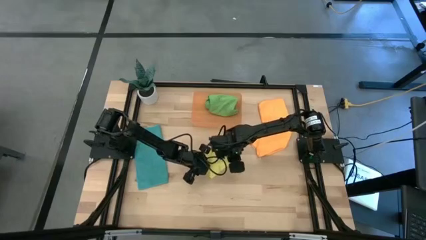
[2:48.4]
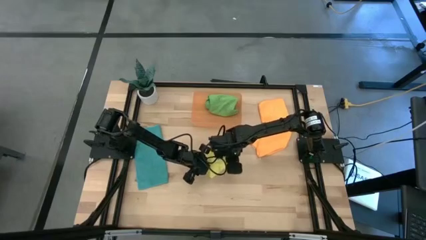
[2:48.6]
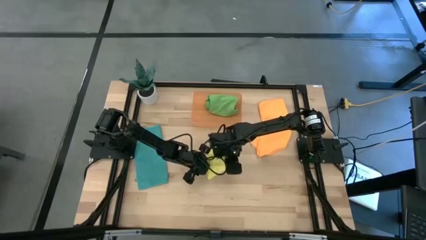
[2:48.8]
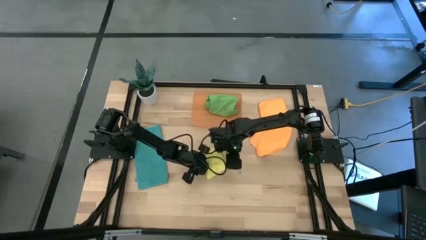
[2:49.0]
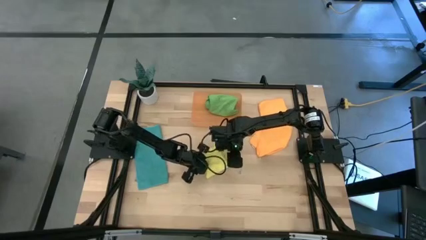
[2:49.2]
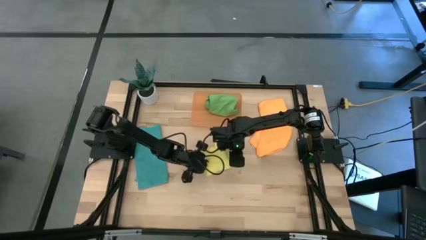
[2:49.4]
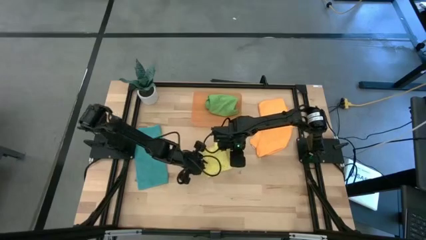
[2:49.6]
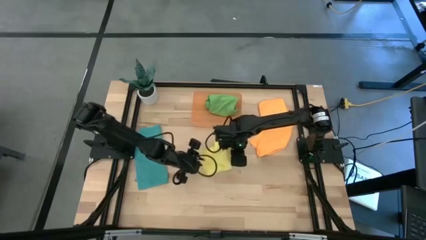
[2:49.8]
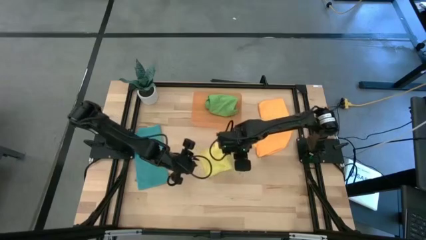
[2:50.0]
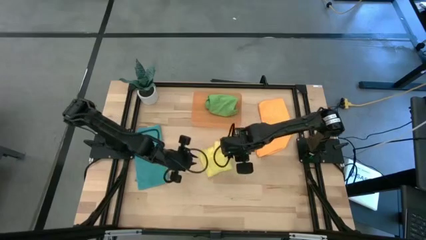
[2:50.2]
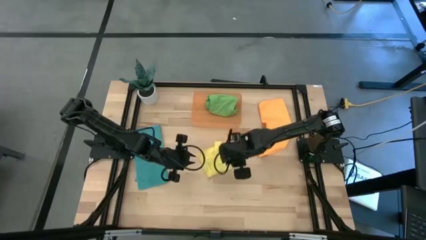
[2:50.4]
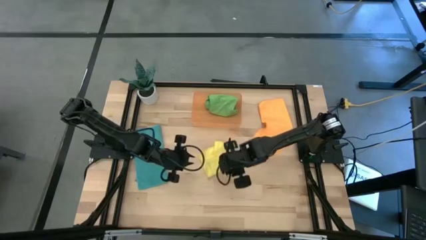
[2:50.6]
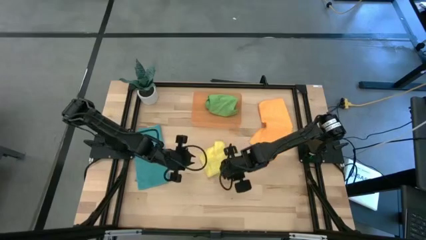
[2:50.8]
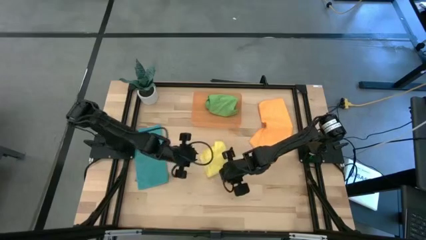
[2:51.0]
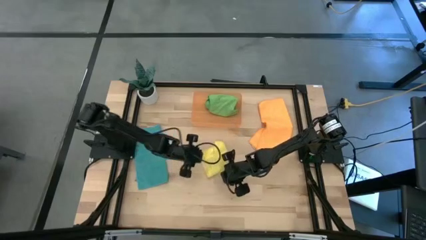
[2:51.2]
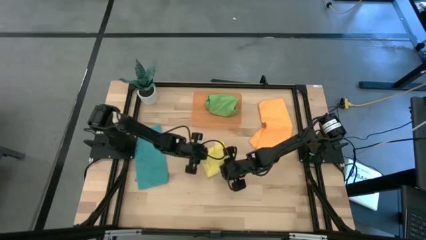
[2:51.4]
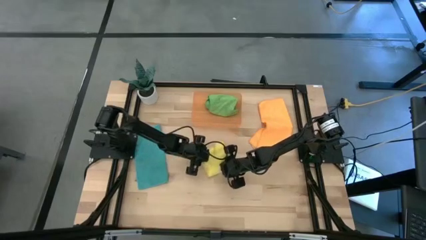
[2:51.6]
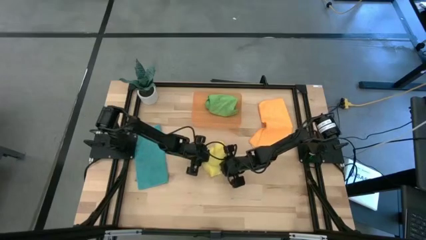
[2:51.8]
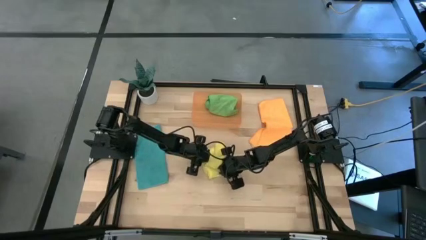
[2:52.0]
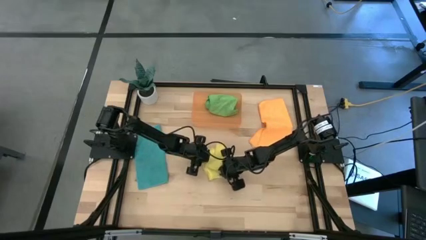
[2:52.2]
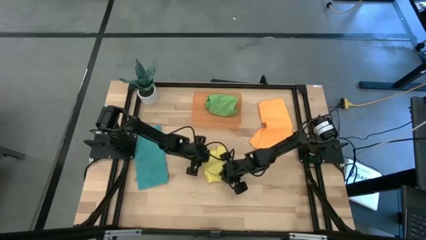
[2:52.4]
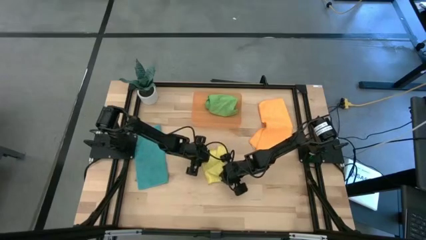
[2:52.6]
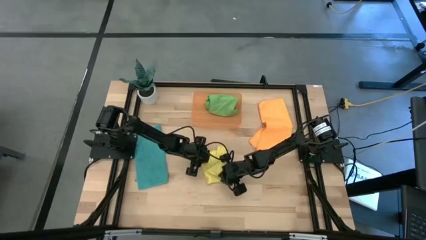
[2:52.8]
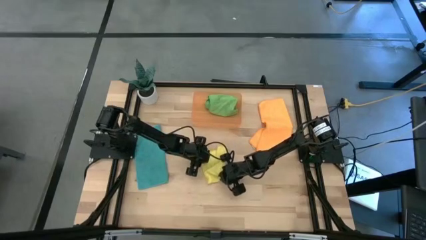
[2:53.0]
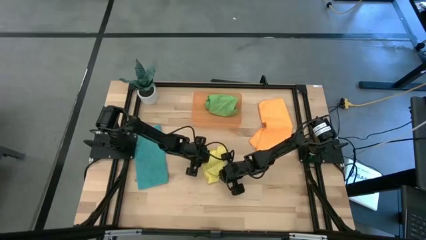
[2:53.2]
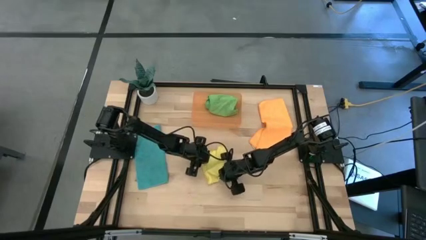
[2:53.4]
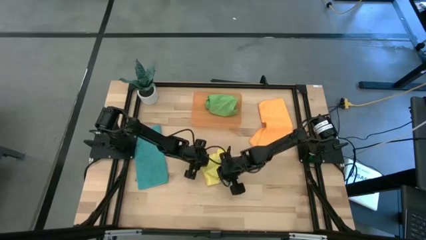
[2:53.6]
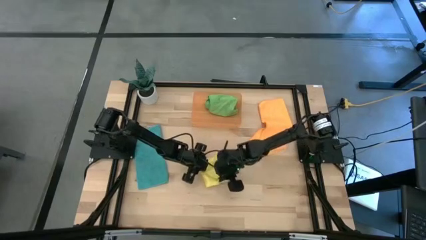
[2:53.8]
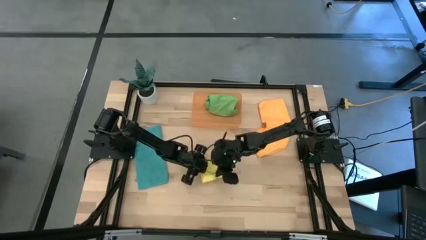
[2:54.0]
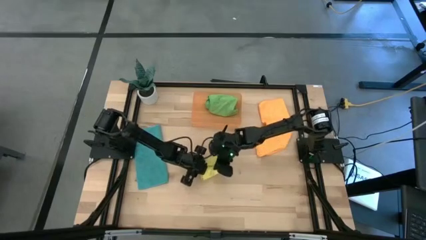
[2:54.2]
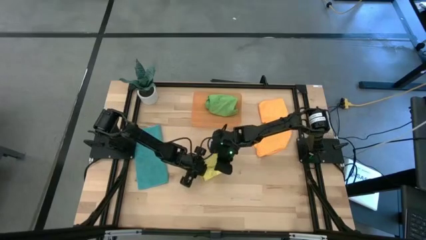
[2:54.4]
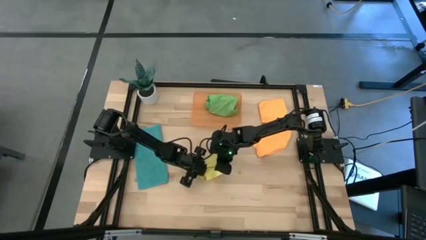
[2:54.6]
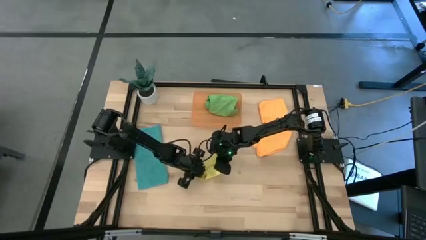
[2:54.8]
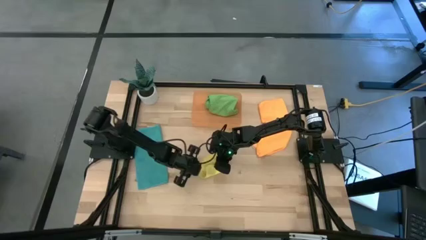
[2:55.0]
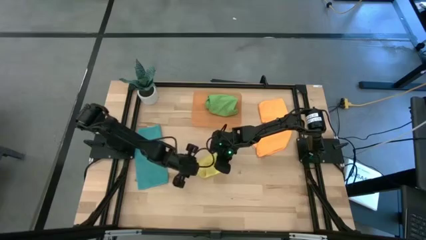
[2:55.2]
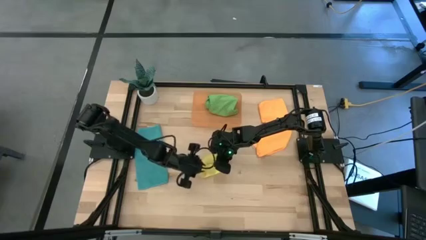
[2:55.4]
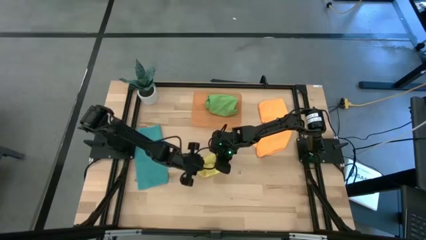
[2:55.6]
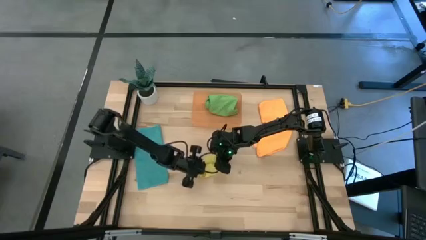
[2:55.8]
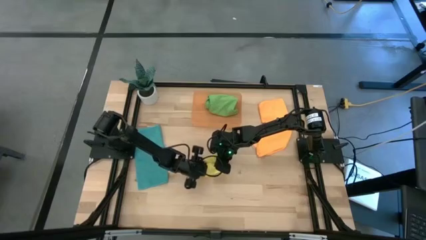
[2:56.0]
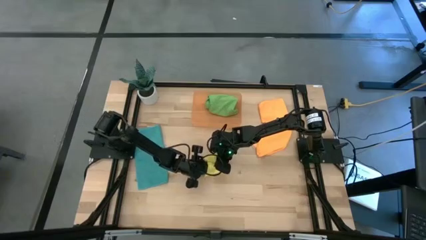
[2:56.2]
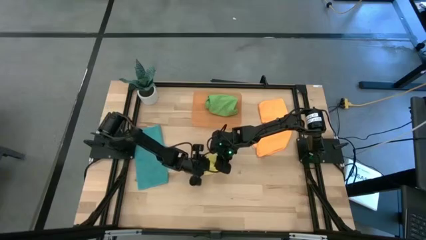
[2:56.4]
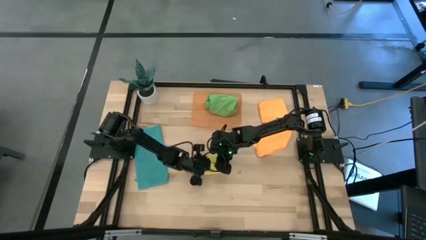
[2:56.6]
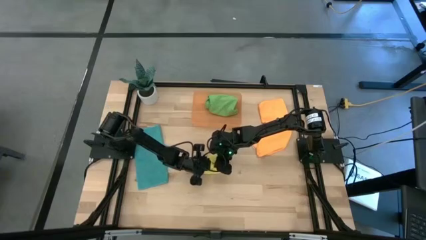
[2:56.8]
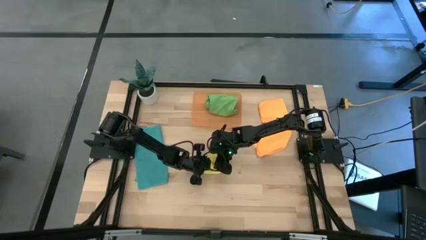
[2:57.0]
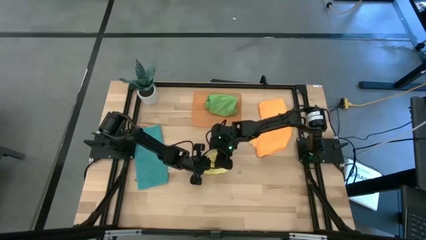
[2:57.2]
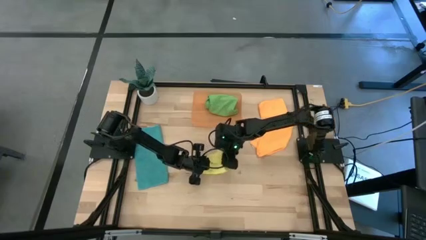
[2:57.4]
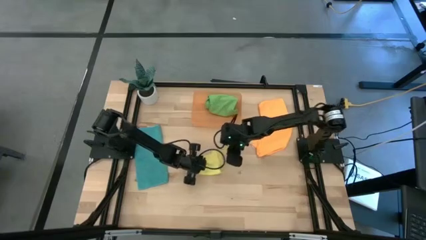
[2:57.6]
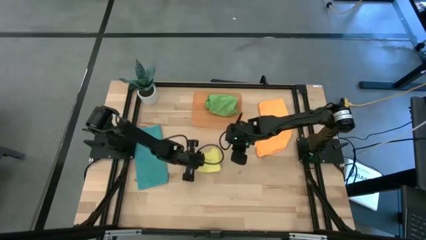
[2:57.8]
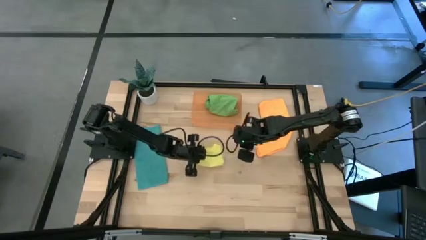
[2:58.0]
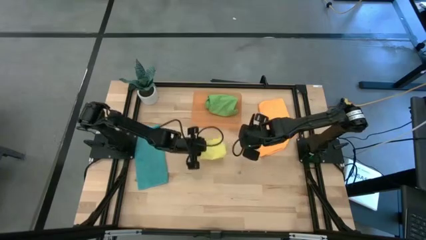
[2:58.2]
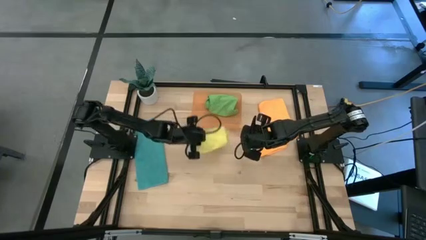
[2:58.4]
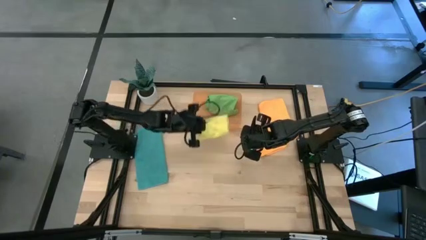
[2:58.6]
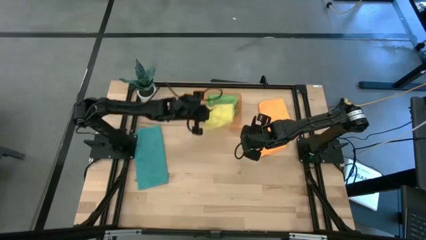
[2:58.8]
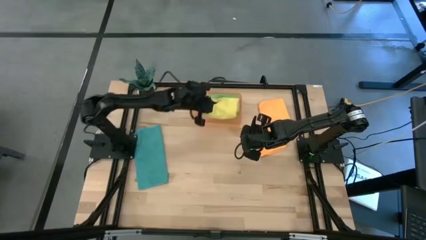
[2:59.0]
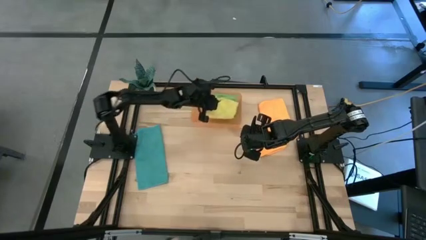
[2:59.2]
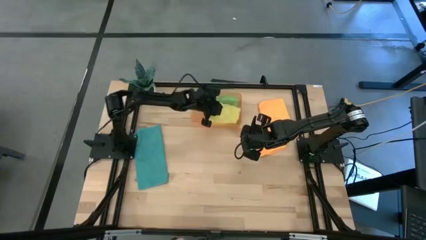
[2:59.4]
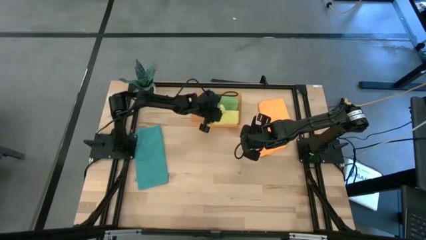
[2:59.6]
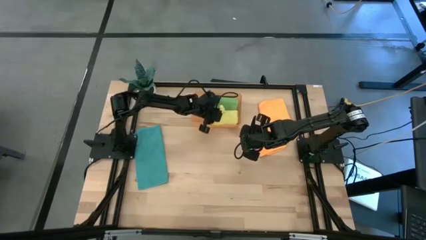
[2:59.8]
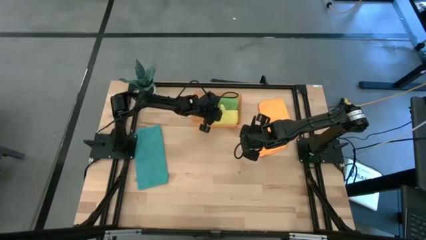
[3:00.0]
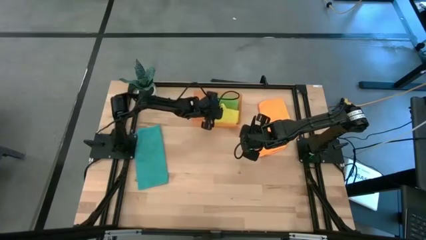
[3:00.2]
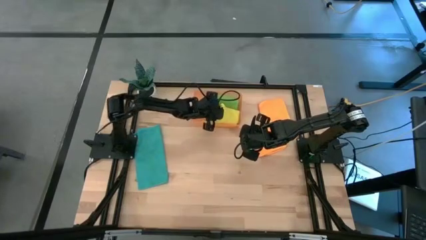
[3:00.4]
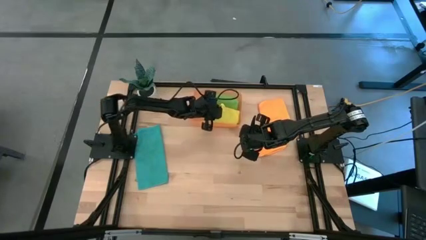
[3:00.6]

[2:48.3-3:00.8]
Task: Roll microfiber towels into tight, uniform cylinder then place into a basket
Put the rolled yellow microfiber cloth into the orange bin

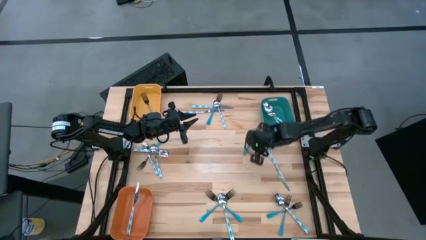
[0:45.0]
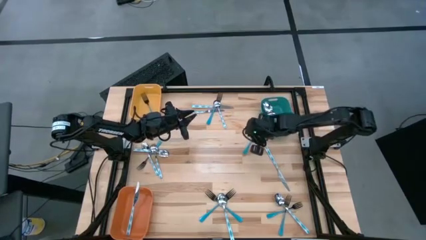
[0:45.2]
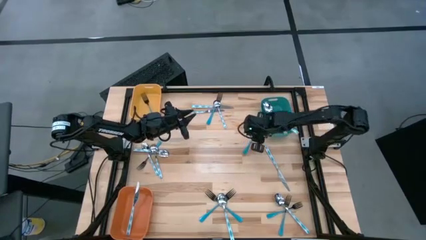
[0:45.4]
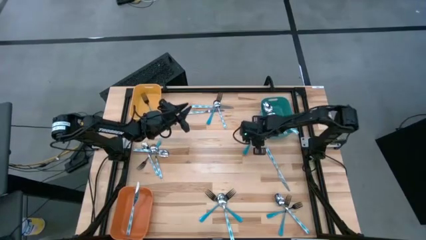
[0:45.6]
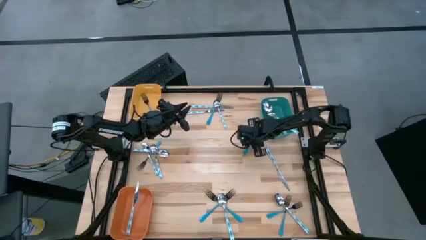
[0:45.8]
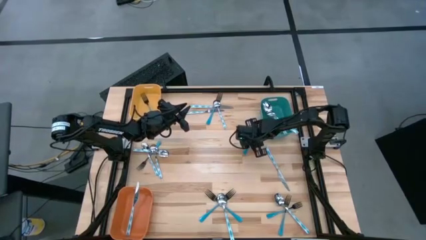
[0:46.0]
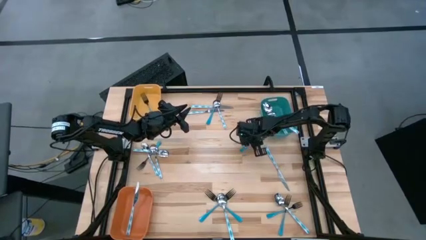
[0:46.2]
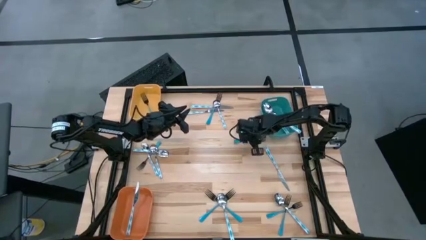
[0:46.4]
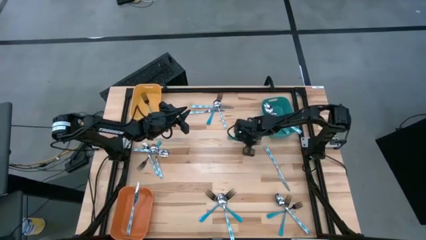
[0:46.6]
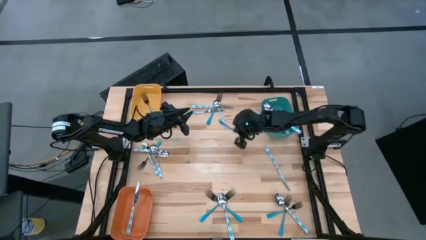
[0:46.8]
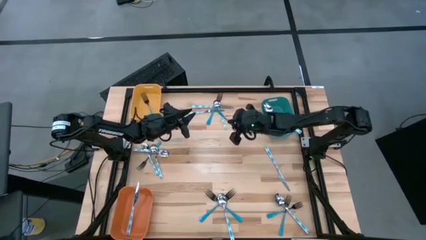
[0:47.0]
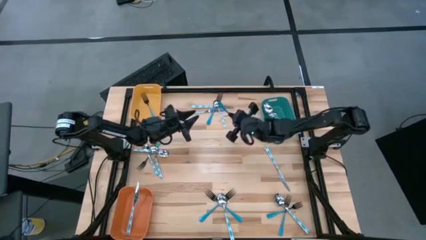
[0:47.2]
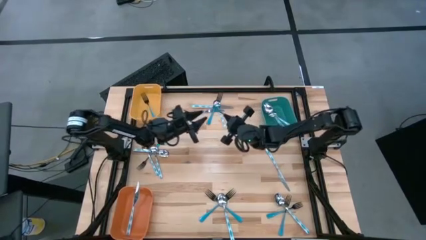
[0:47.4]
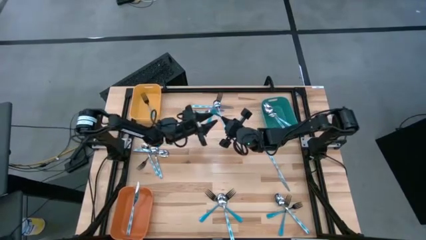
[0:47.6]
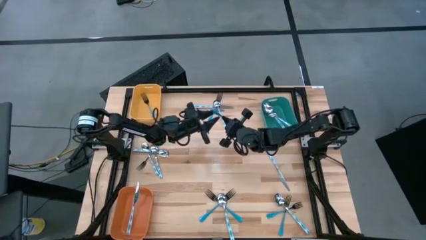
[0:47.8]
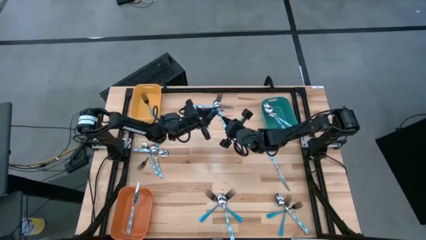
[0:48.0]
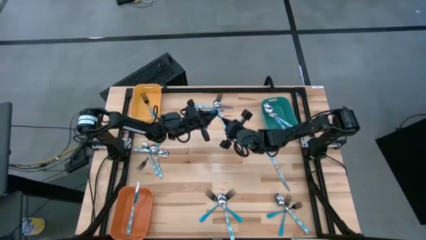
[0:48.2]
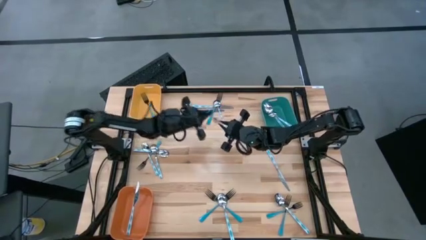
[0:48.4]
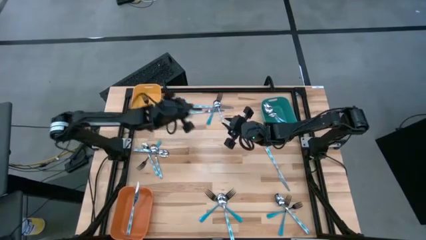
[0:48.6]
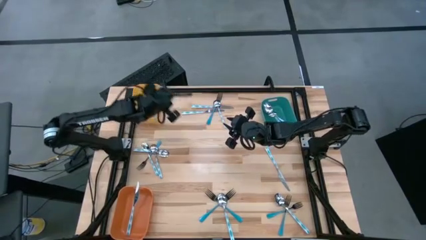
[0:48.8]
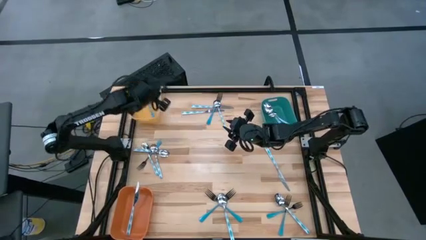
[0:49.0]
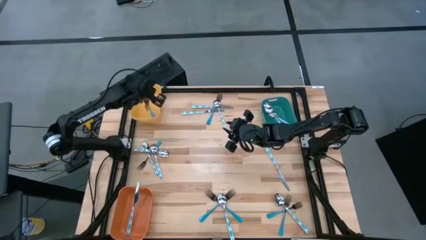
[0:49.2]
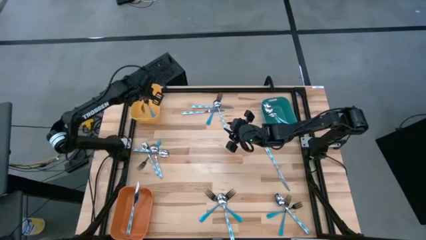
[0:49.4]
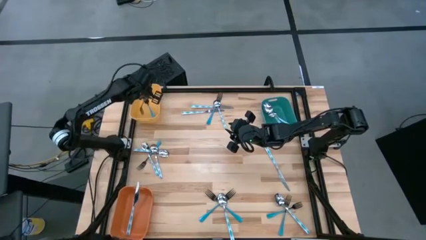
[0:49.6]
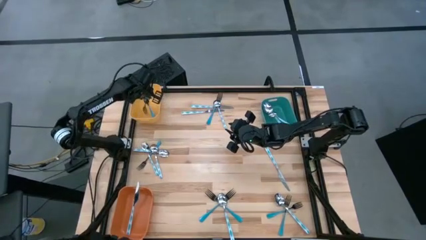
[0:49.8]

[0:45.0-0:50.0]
Task: Sort silverware by color (type)
Put the blue fork into the yellow bin
